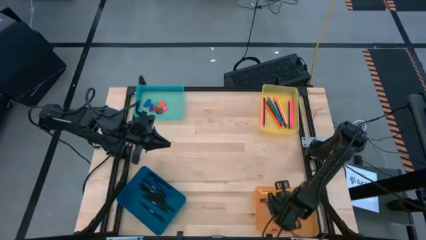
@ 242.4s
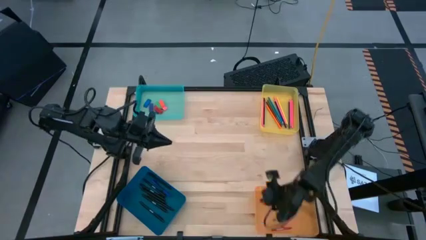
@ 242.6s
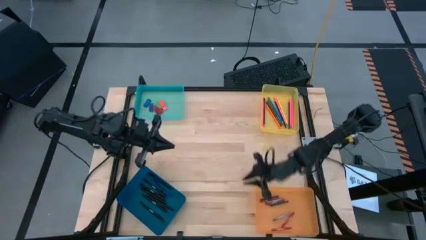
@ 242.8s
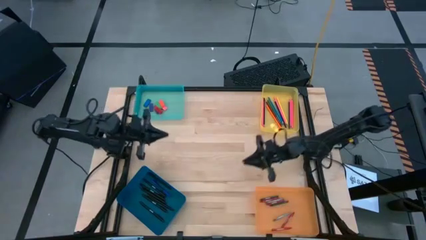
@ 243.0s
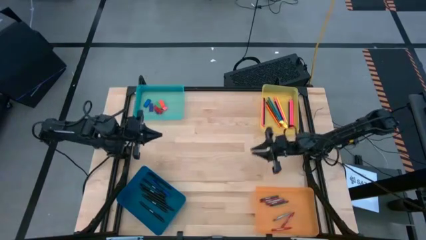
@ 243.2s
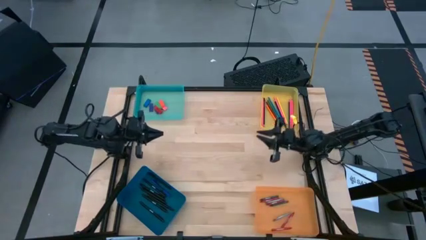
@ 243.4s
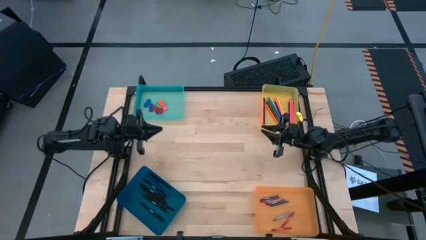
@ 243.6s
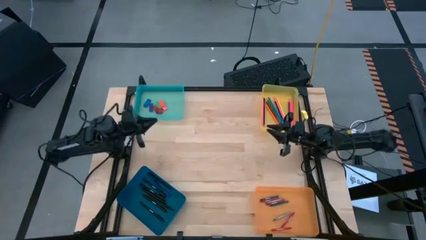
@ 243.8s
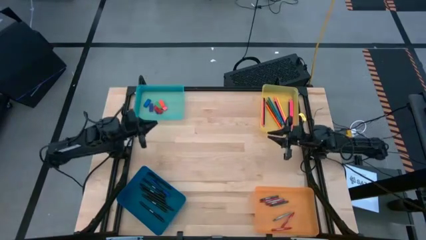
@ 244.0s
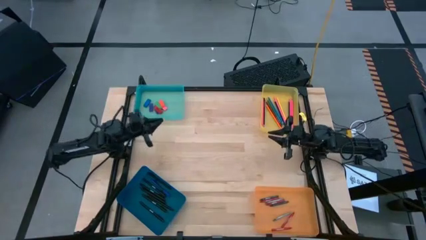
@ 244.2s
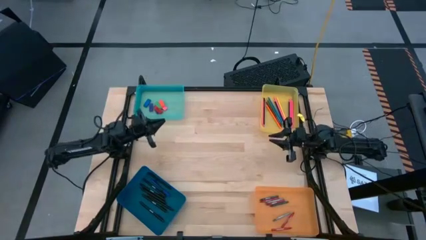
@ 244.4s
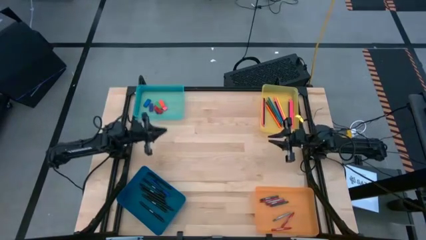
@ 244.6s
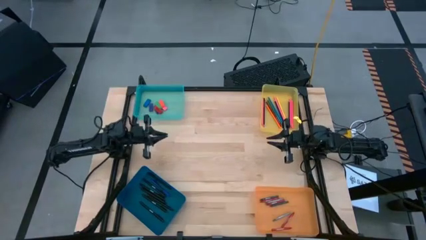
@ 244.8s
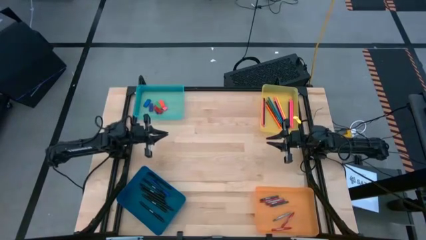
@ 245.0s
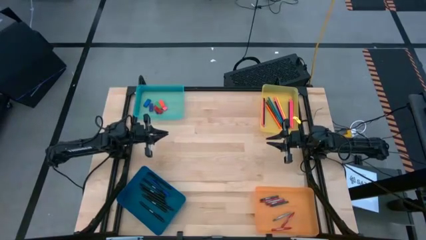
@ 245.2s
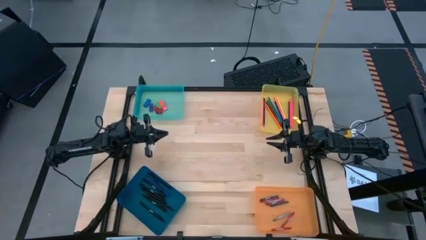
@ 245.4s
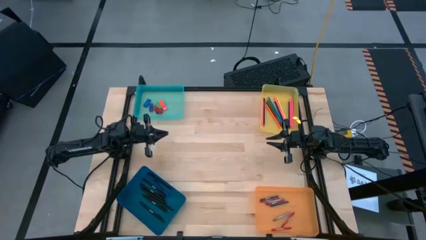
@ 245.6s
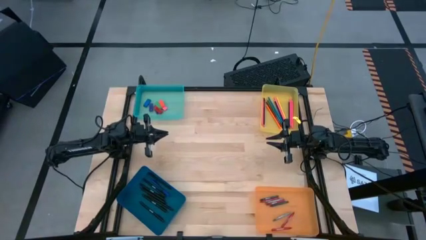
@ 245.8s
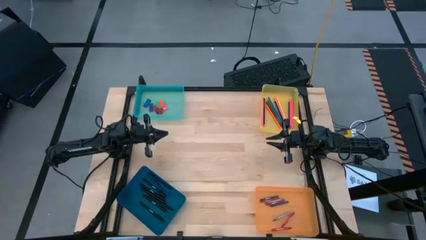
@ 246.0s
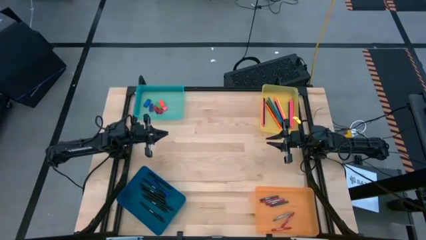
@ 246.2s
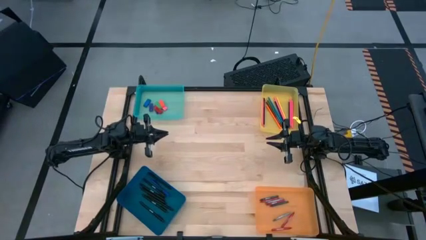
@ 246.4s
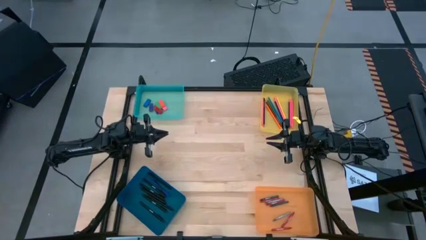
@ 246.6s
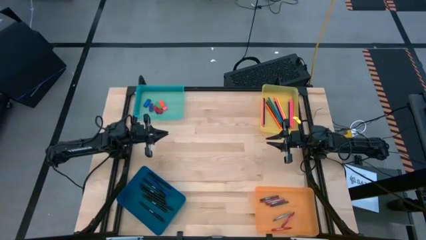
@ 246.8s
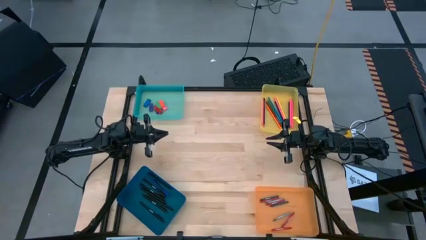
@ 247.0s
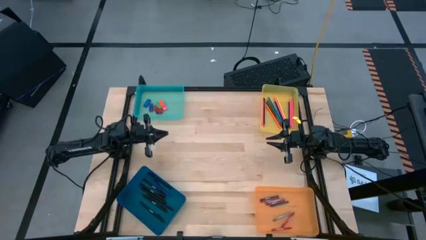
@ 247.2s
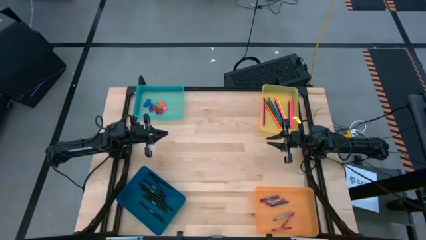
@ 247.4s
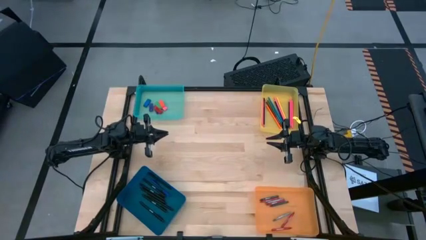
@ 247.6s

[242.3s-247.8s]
Task: Sort crayons/erasers/pens/pencils in bins
Return to Home Position

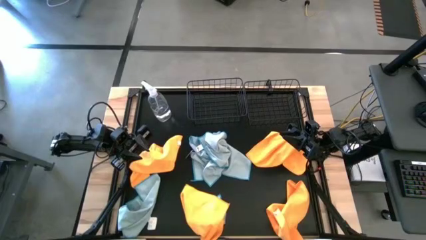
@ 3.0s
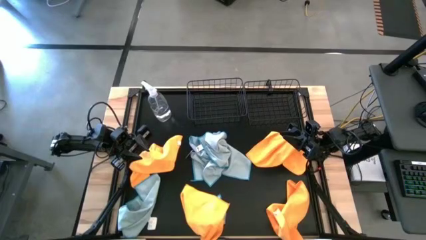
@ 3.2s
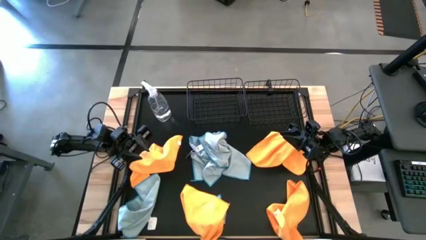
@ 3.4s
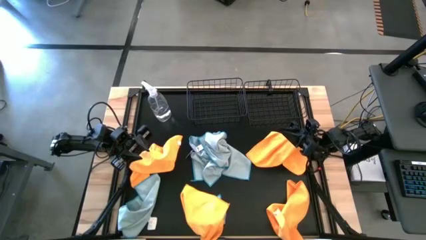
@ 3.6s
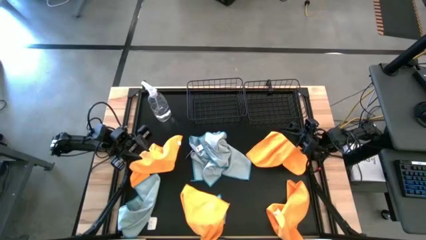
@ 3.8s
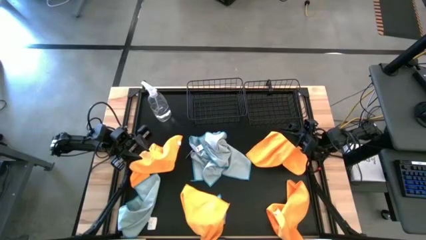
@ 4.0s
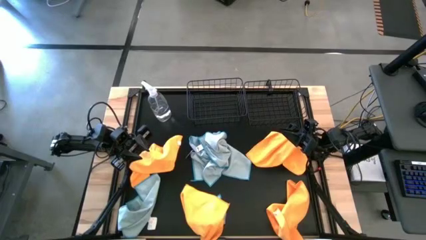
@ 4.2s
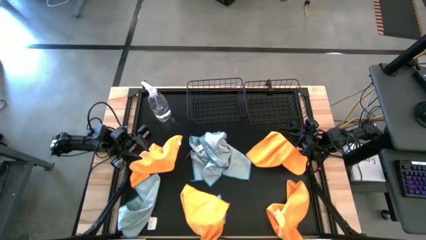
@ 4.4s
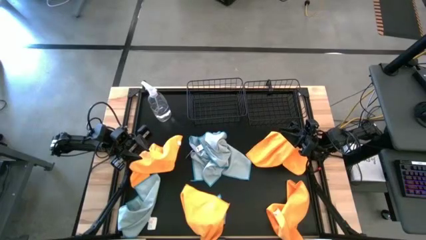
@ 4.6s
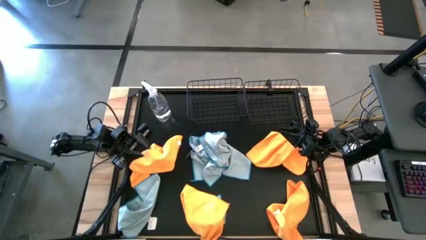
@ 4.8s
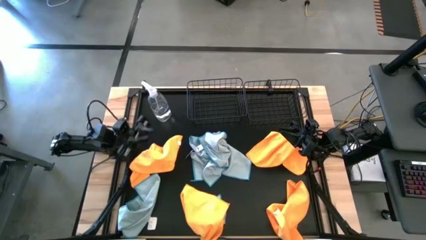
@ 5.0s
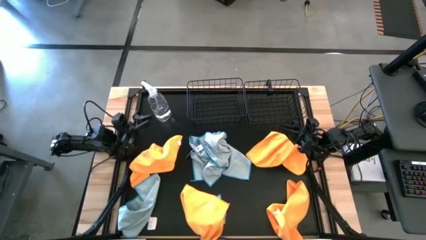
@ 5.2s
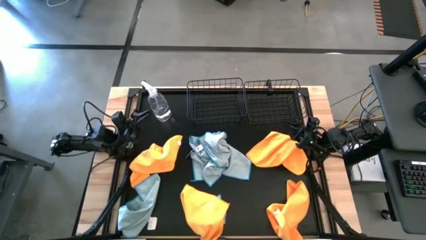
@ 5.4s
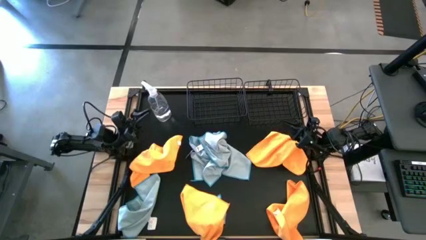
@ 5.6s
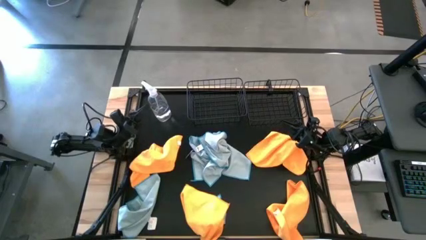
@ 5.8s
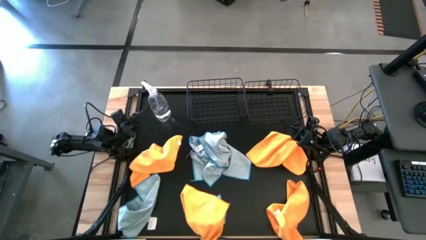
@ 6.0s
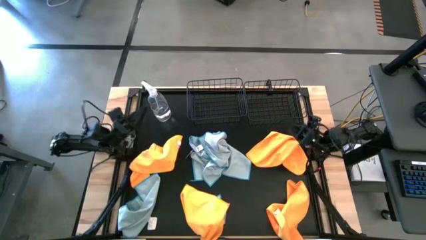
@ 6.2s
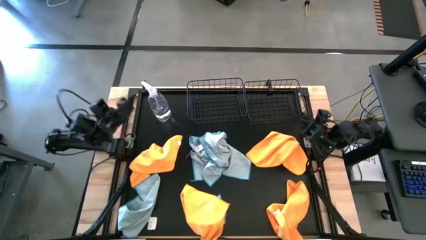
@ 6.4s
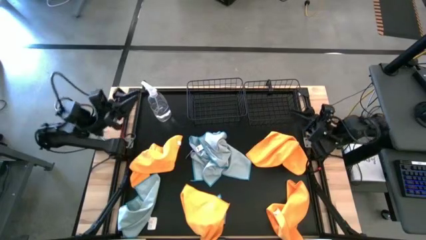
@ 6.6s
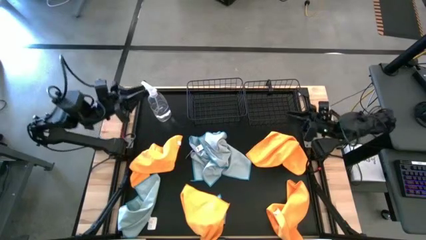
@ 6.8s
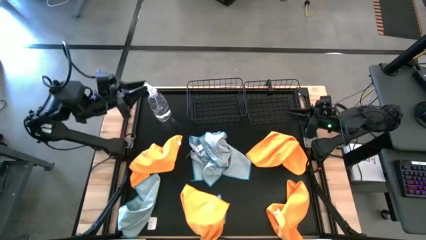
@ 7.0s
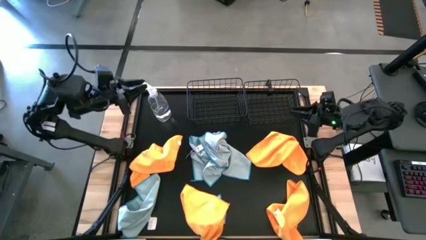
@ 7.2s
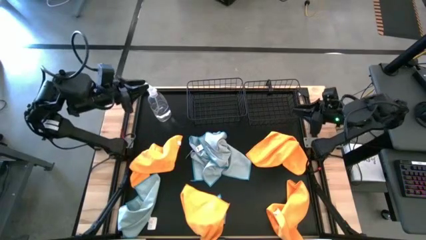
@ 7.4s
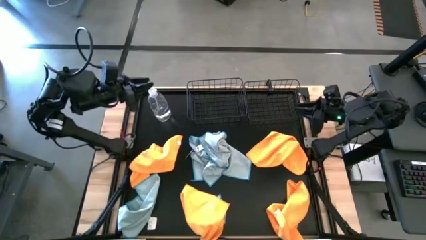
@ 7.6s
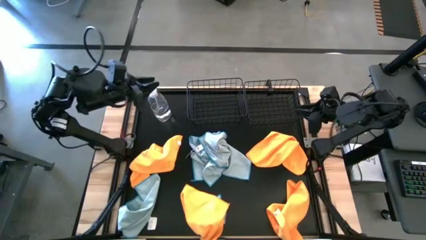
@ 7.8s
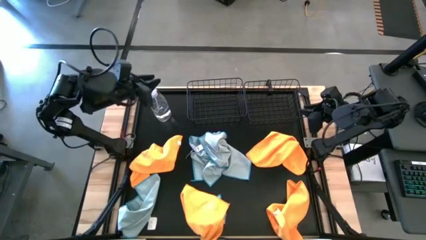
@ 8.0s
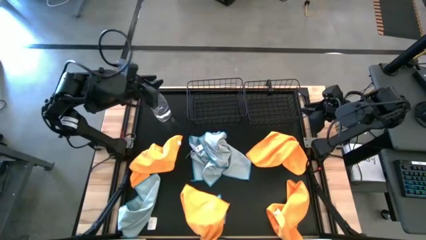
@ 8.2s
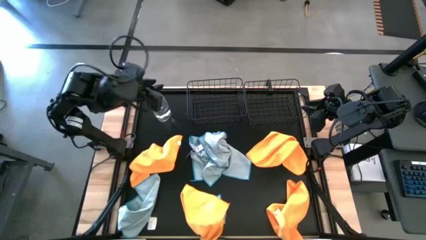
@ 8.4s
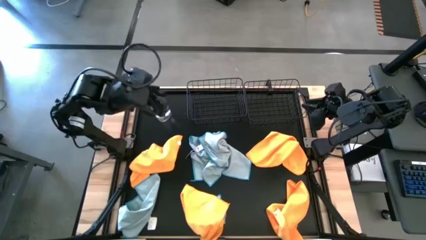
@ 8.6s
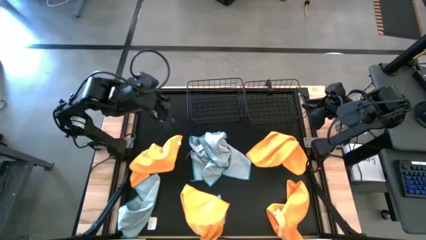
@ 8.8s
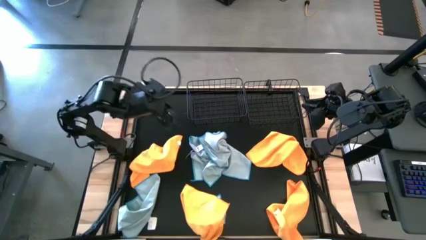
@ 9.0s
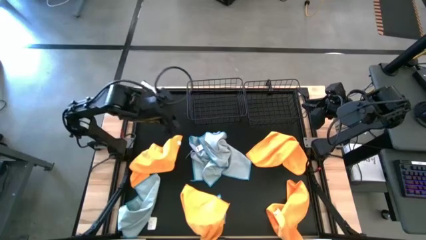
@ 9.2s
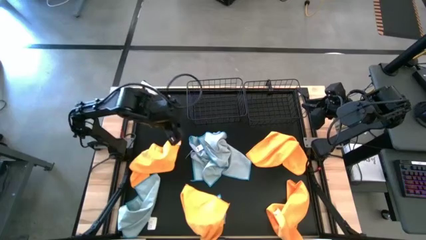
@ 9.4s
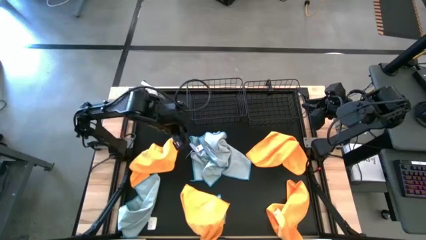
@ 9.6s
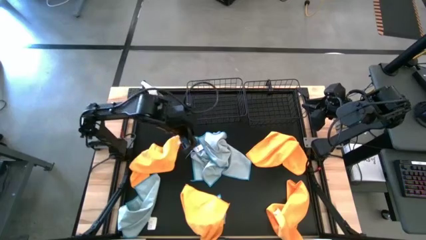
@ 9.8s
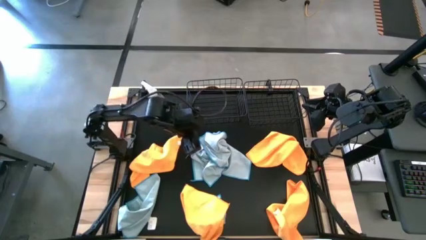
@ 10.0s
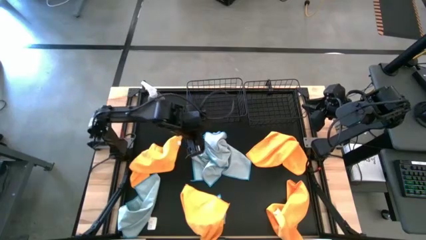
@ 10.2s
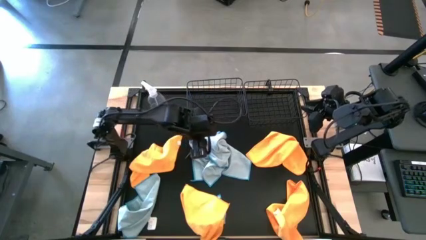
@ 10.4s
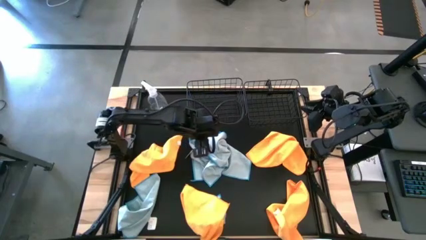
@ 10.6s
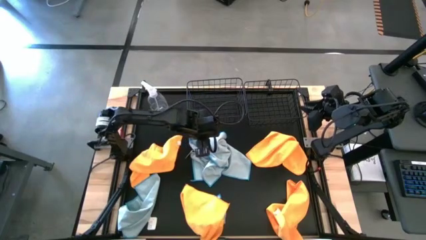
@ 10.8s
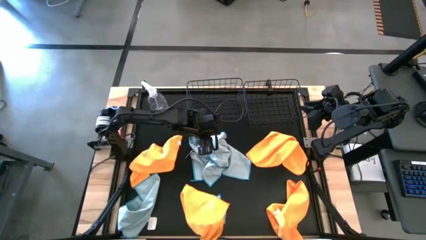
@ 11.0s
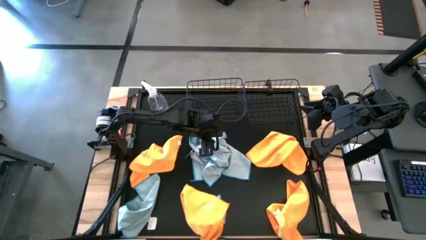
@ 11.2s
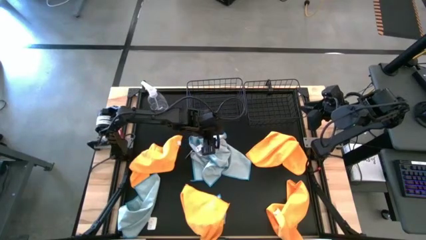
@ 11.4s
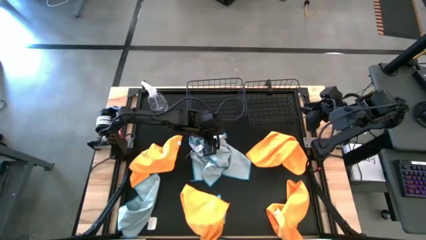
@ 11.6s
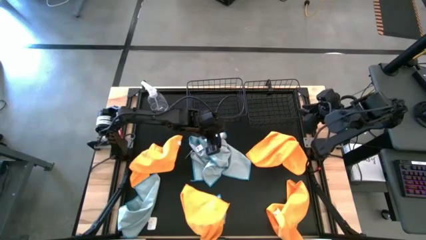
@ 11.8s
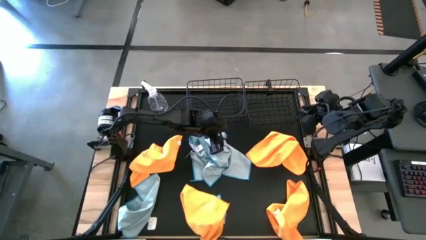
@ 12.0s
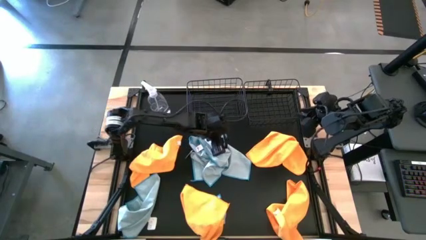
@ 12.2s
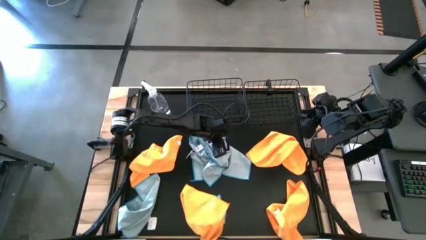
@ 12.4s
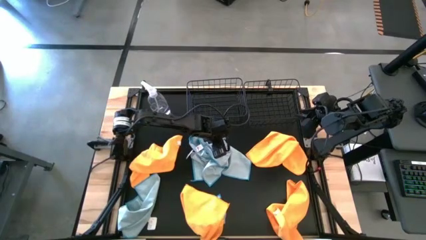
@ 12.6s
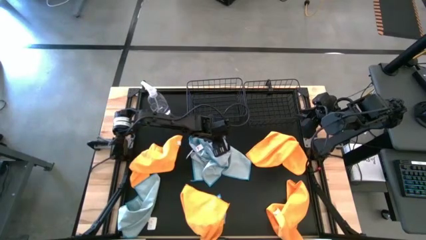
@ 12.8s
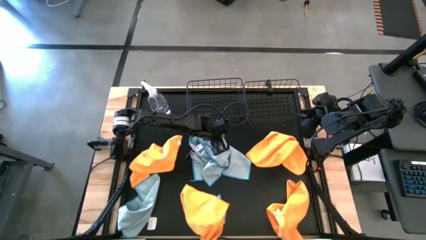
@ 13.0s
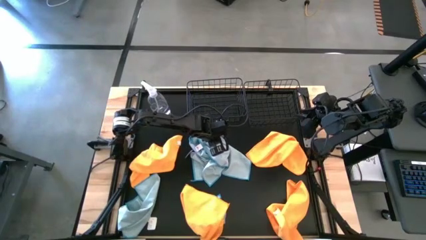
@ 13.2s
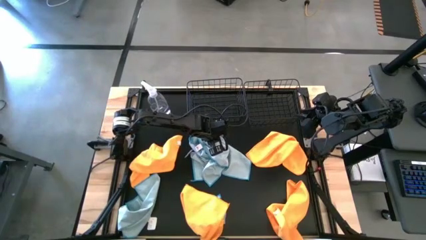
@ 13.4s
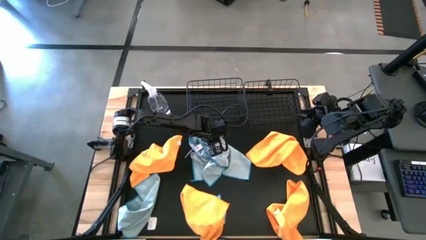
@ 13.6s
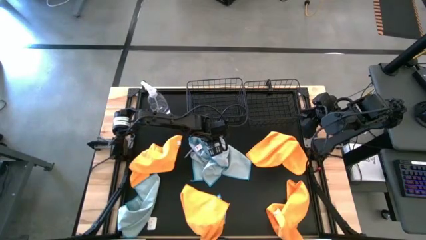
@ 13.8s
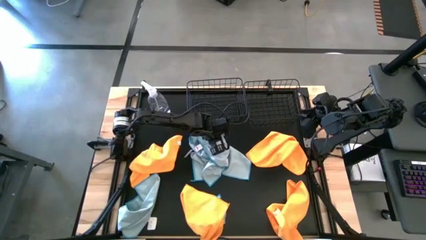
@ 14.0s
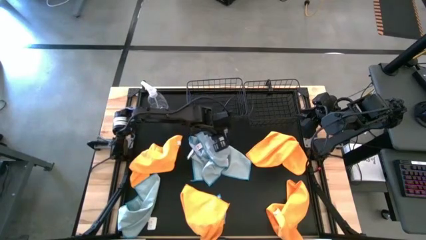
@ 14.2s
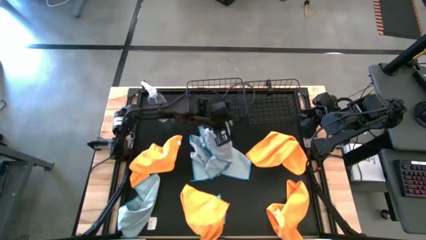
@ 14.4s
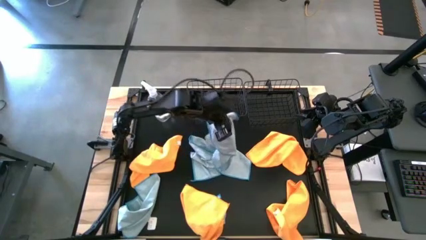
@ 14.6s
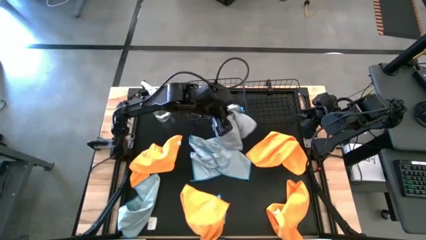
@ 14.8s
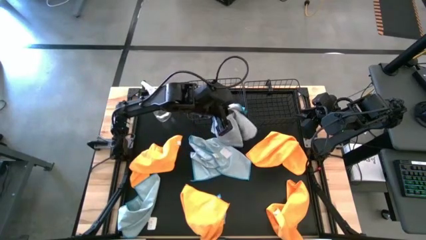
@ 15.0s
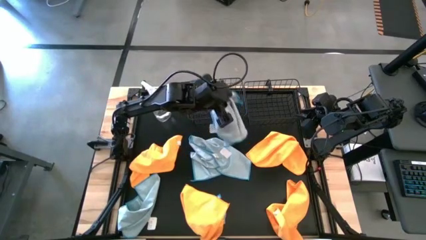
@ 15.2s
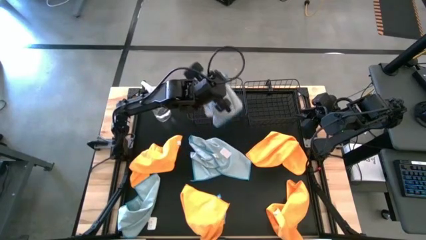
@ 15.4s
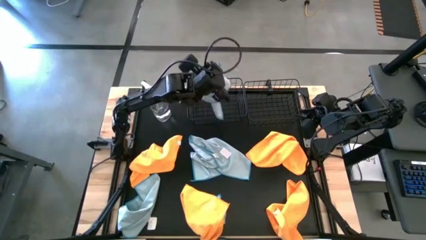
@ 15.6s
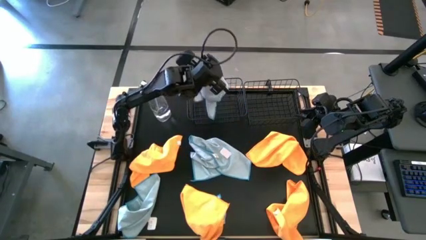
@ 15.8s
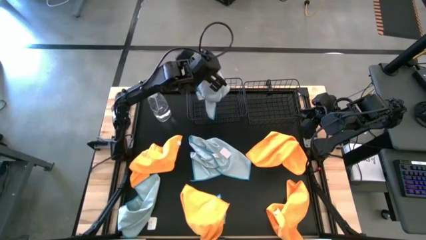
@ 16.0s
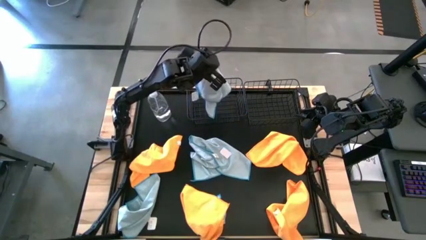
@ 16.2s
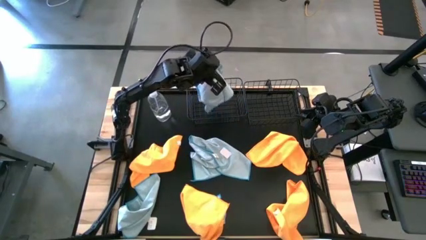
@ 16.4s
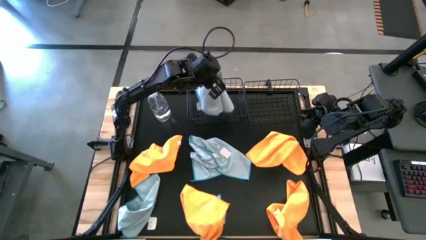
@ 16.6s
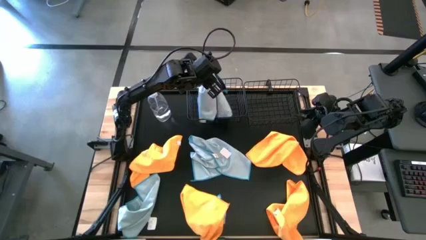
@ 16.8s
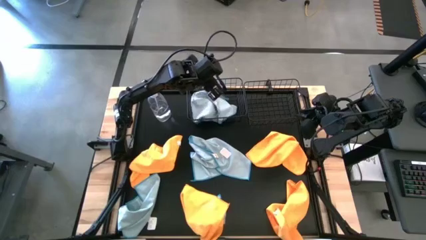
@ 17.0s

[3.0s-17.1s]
Task: Sort microfiber towel by color & place in baskets
Put the middle blue microfiber towel into the left black wire basket
